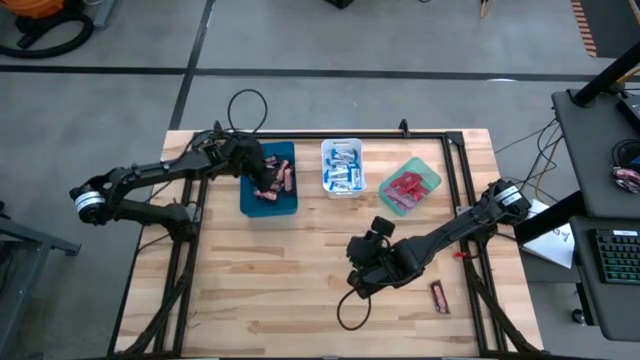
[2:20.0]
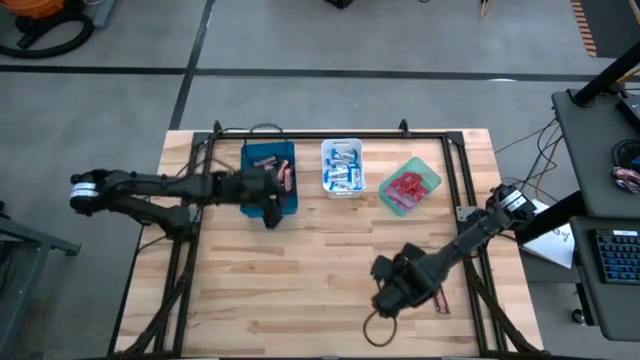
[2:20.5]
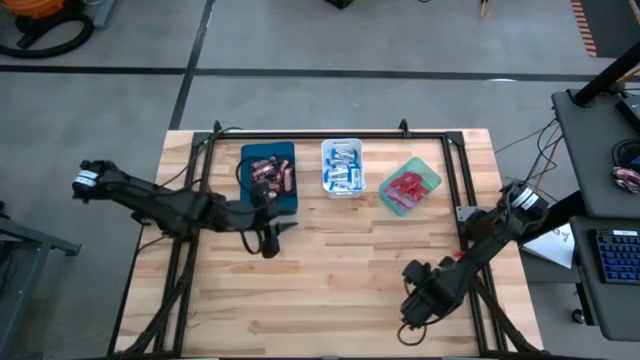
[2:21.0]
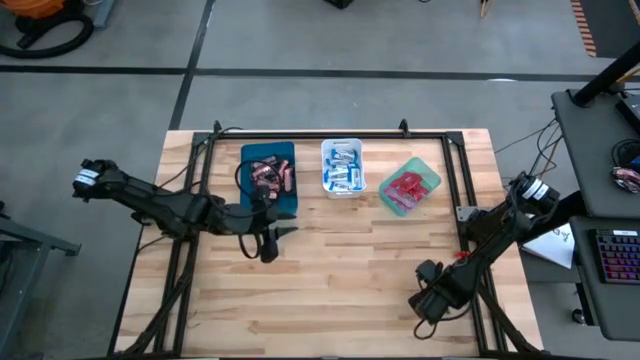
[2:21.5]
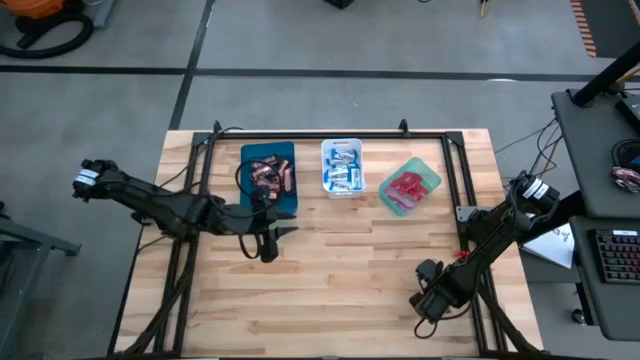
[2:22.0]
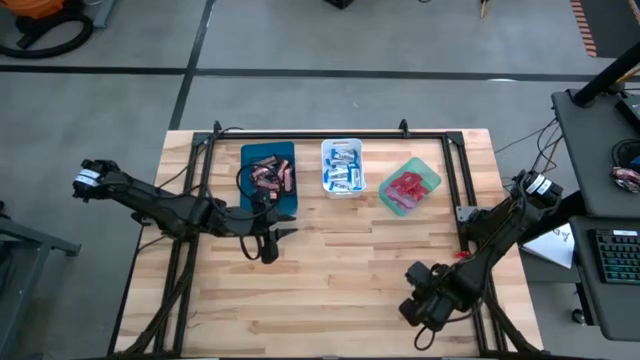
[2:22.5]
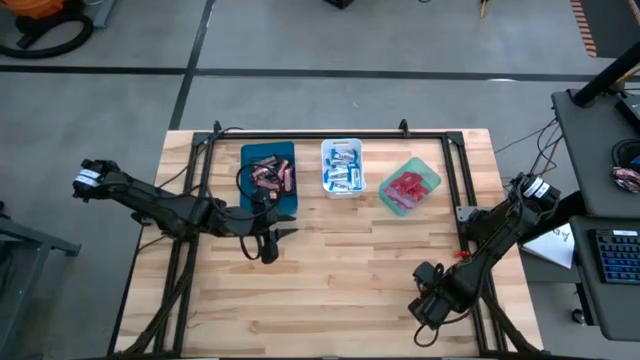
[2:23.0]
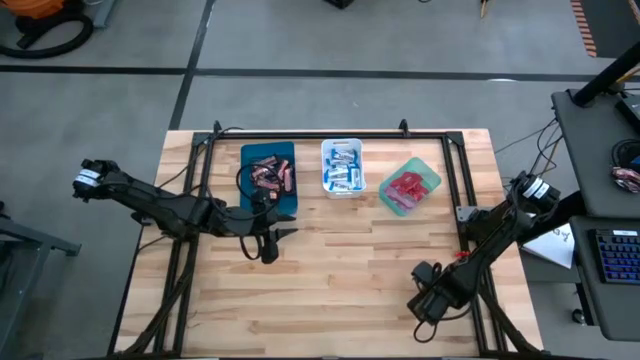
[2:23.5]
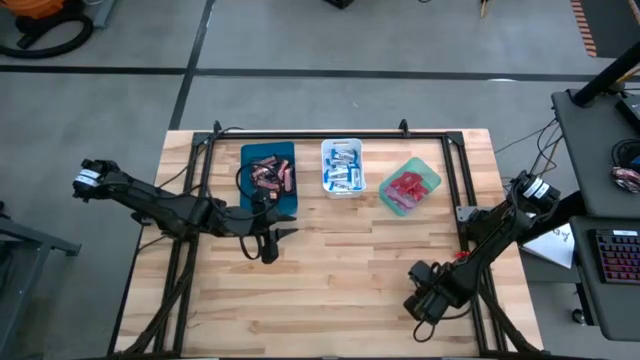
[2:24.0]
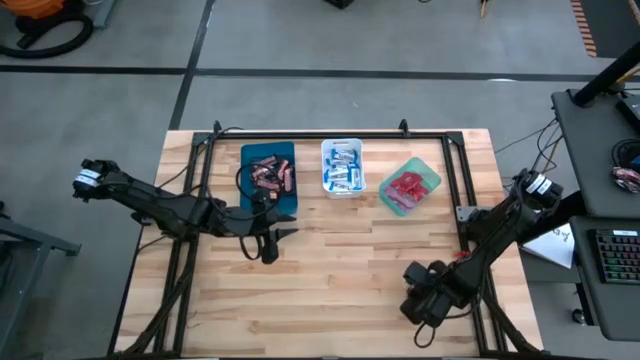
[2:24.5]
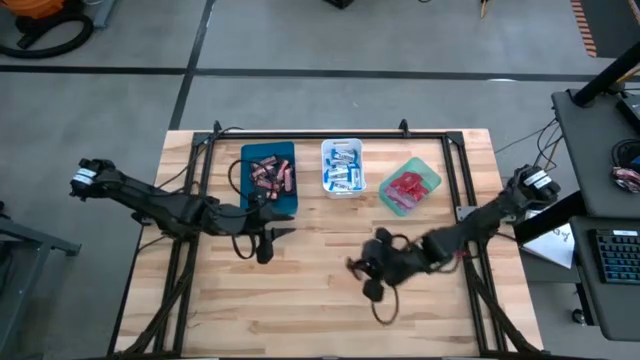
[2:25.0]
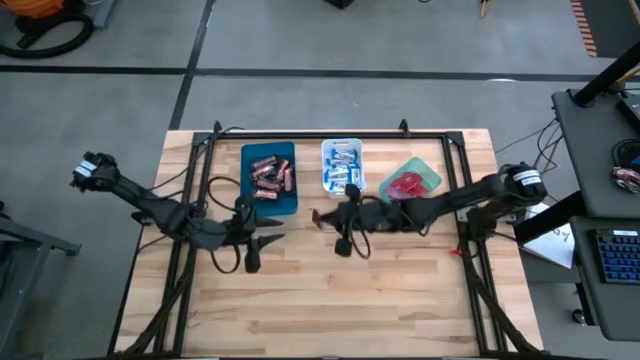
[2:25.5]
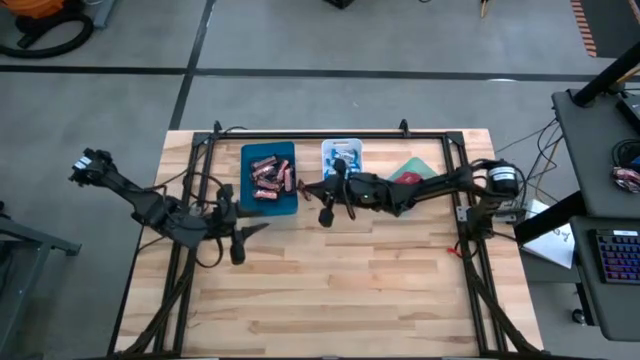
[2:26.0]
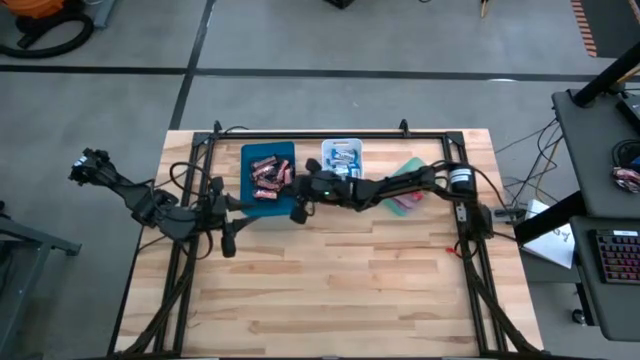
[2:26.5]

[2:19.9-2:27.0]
Task: Sort candy
Put the brown chocolate into the blue bin

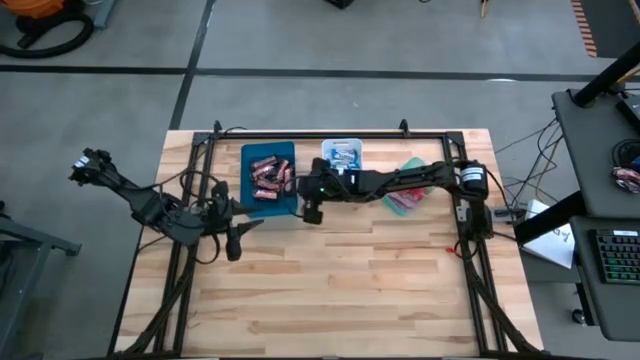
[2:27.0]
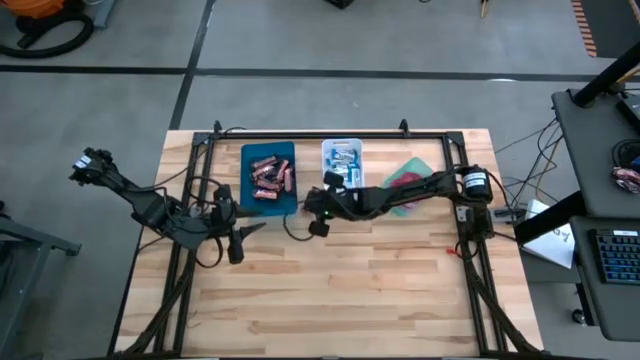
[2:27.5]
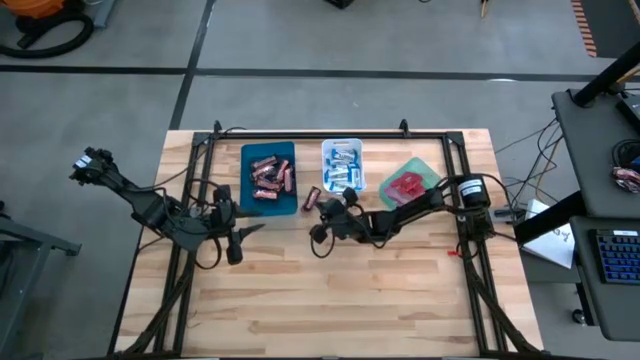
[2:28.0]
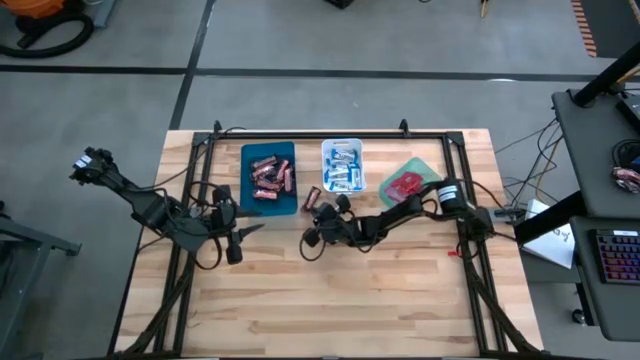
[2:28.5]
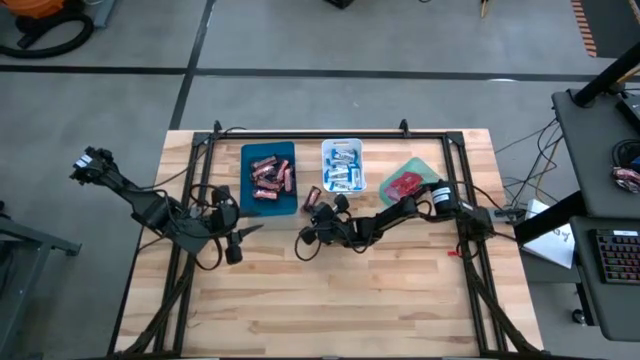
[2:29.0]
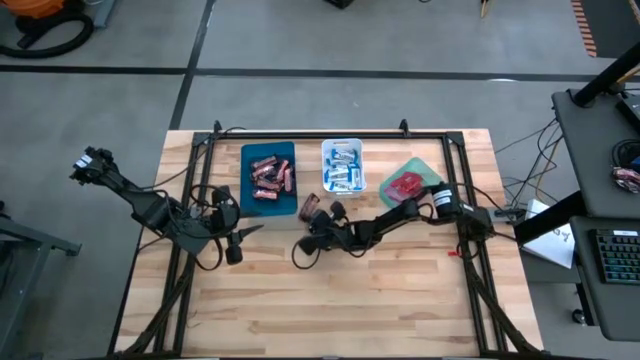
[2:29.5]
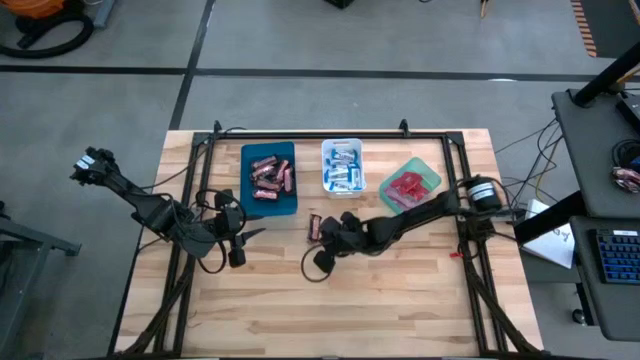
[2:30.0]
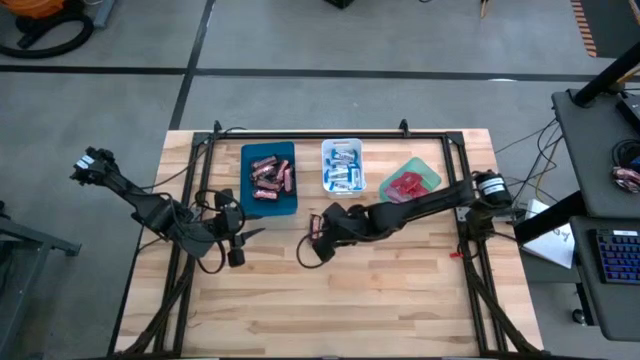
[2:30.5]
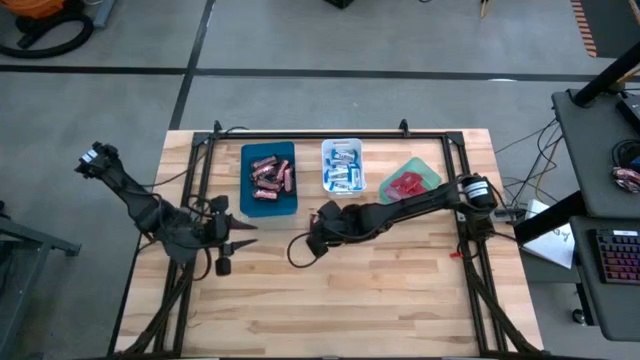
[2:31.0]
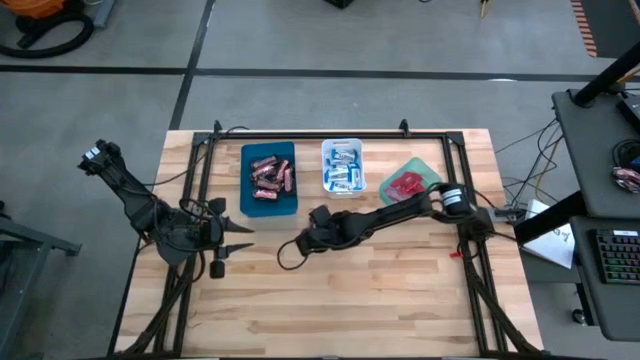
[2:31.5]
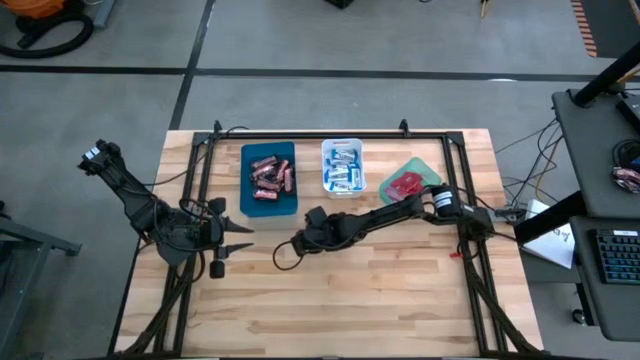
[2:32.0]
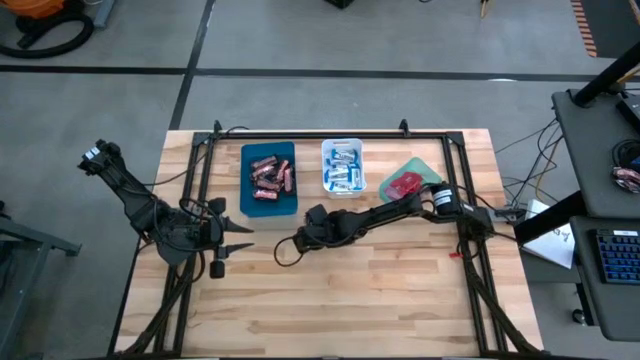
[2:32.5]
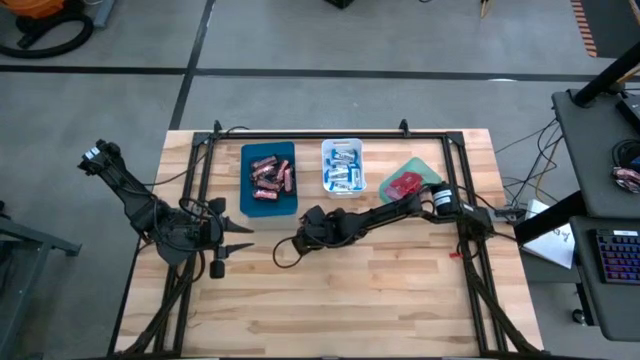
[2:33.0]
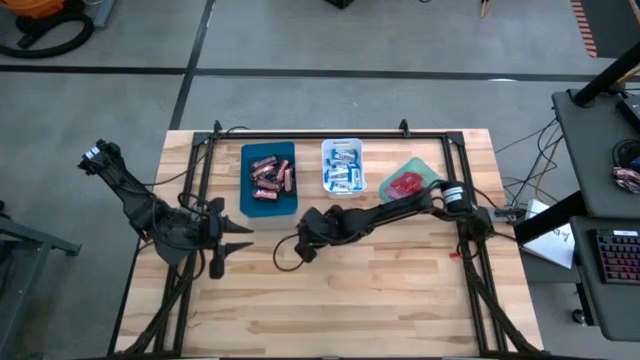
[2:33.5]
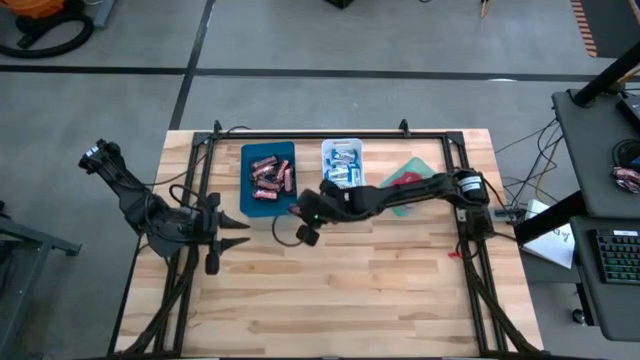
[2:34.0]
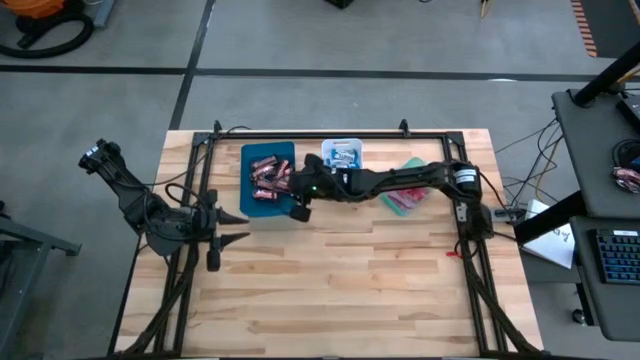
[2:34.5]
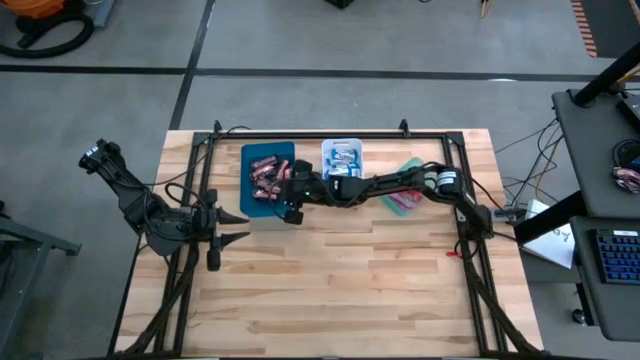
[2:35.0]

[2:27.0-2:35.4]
Put the brown chocolate into the blue bin

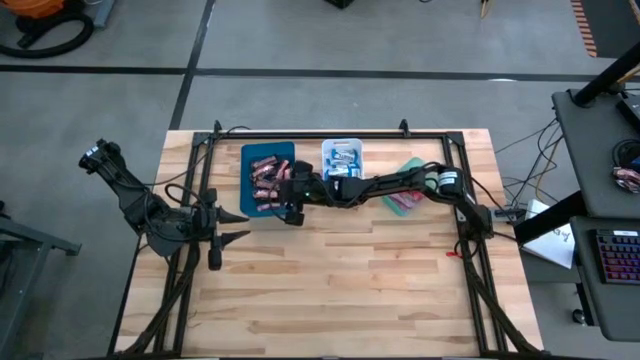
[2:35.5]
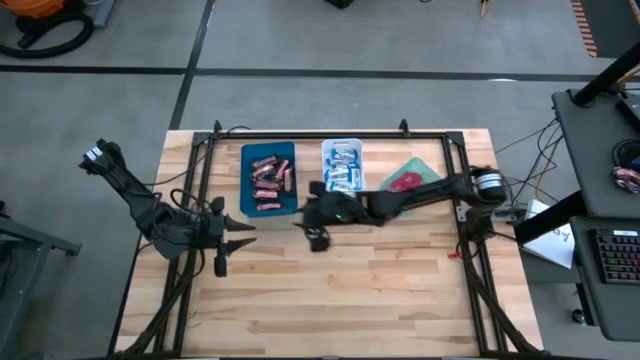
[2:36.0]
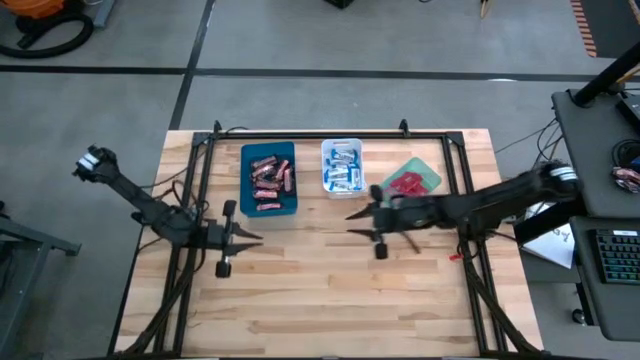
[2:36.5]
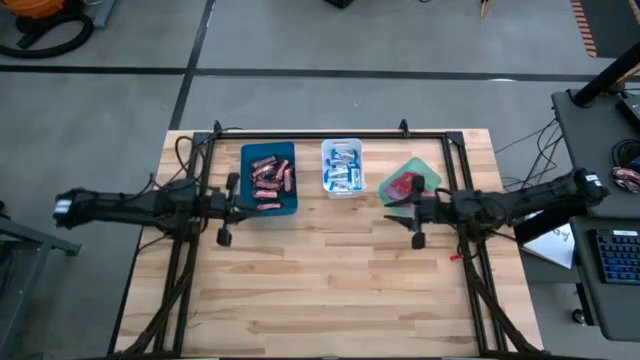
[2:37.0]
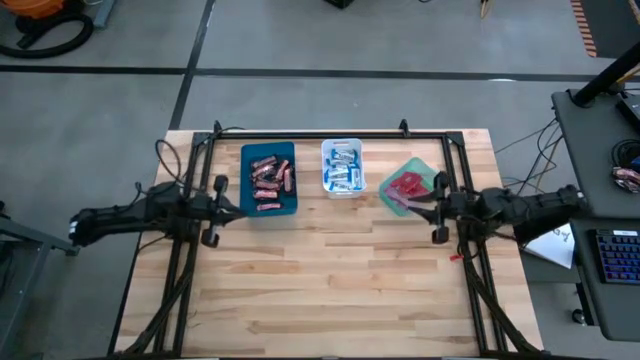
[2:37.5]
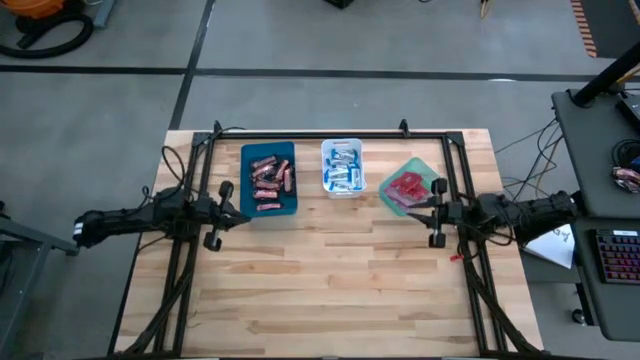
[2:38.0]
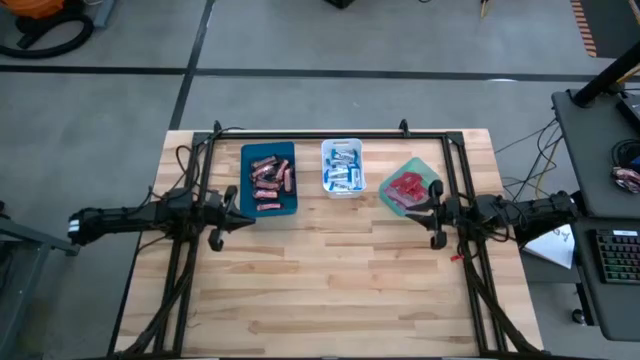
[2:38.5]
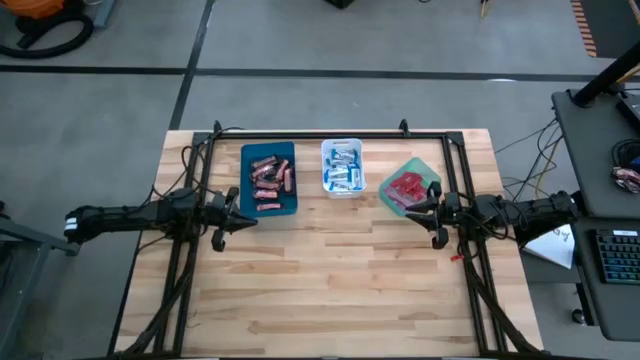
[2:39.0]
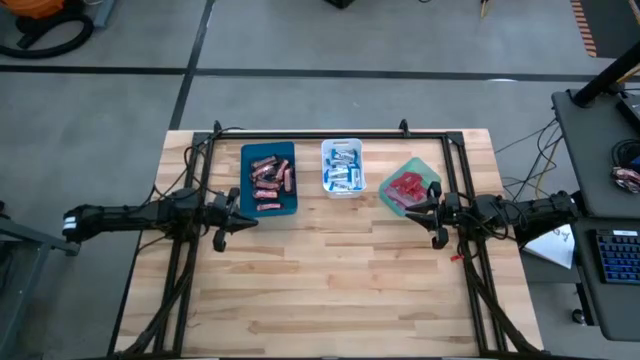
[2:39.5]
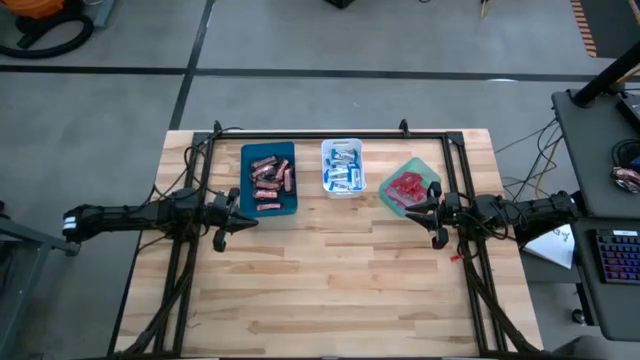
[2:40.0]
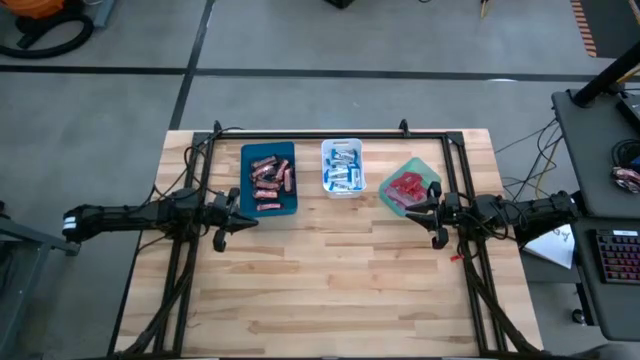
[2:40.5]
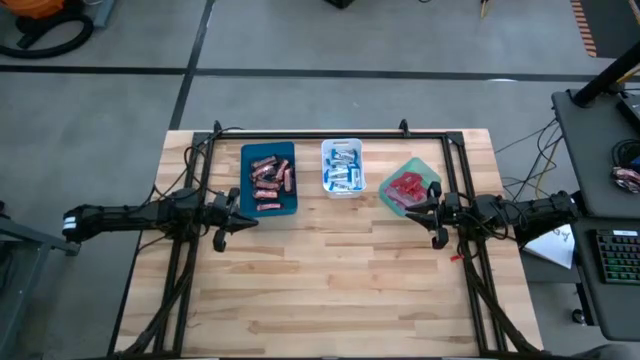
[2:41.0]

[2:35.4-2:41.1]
Return to Home Position
